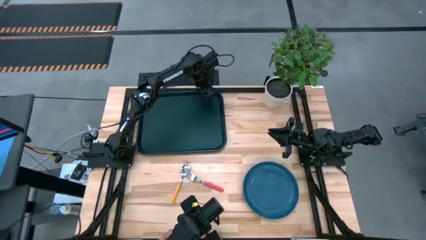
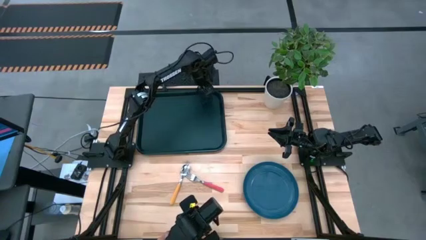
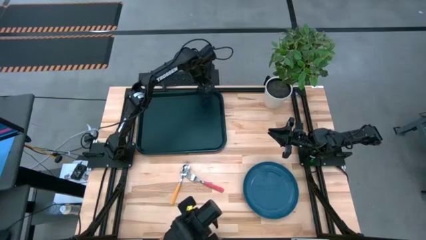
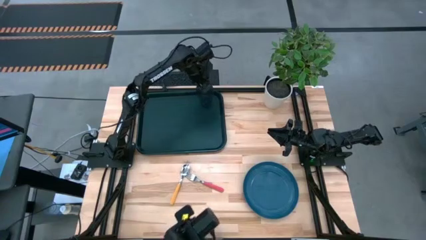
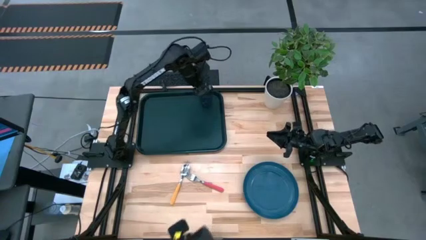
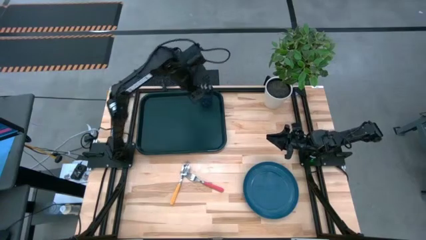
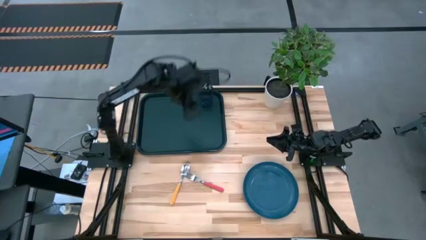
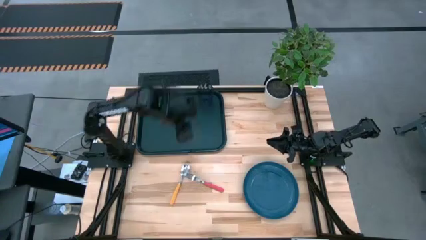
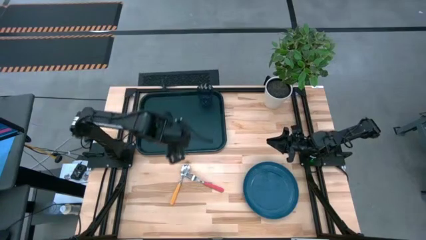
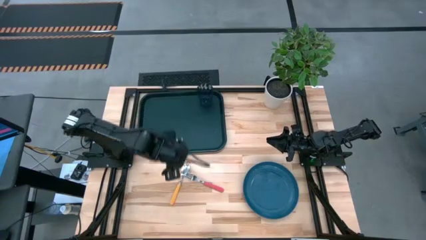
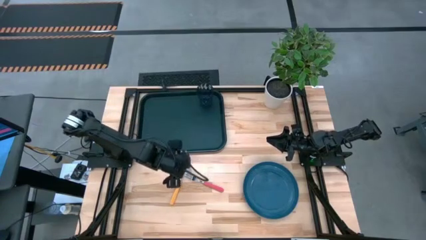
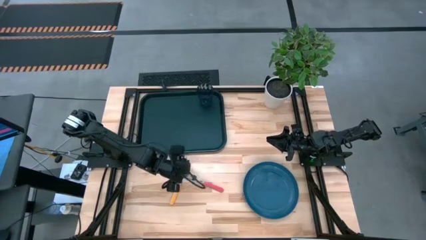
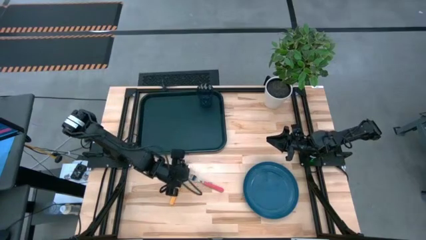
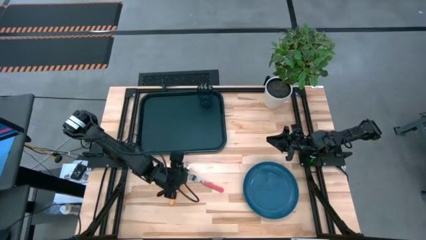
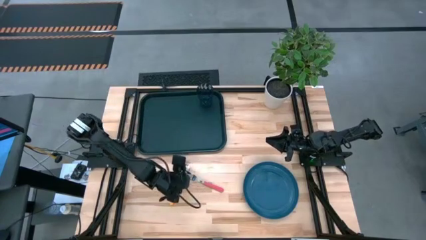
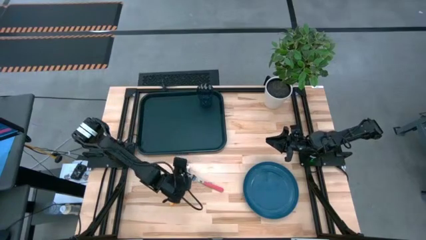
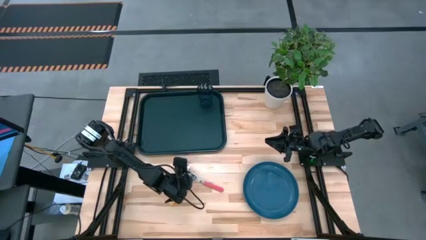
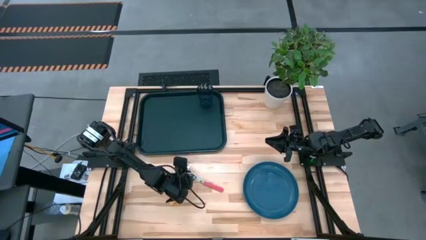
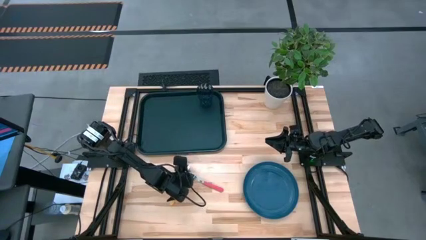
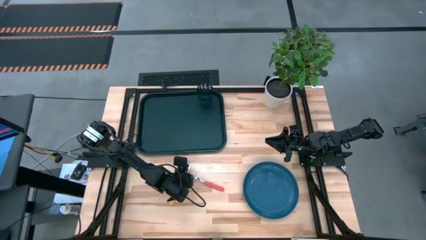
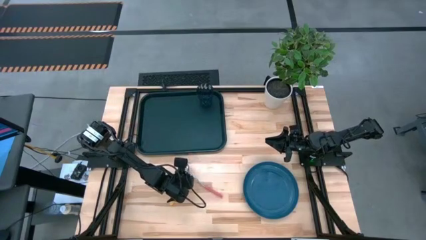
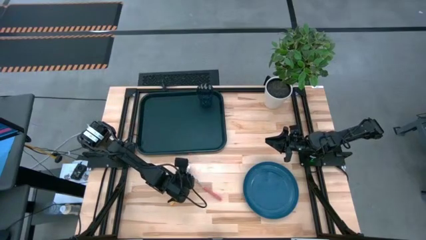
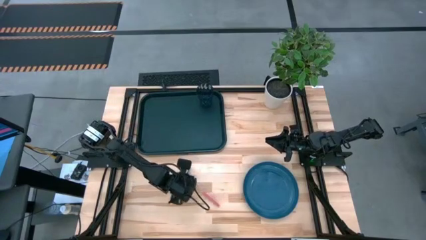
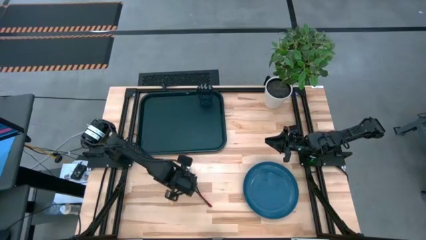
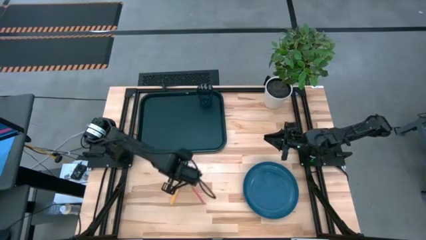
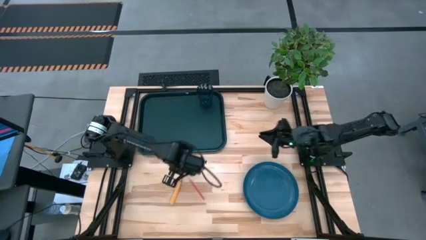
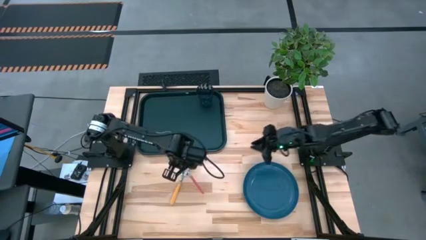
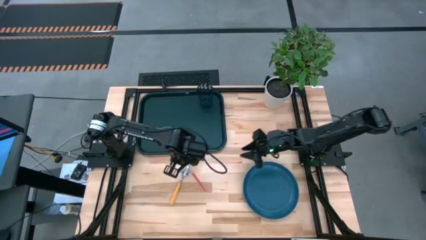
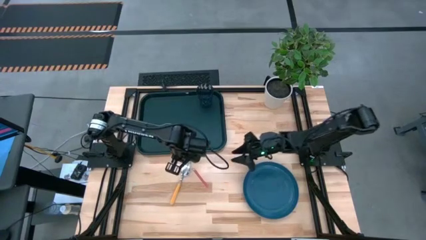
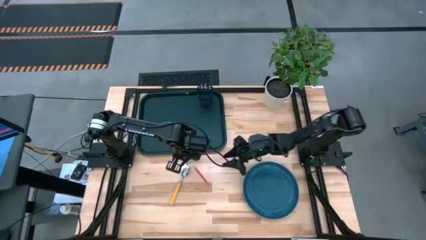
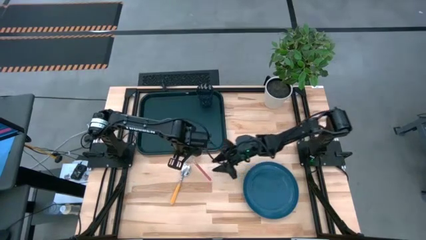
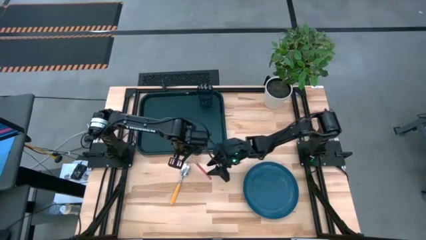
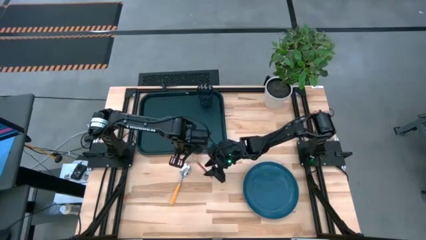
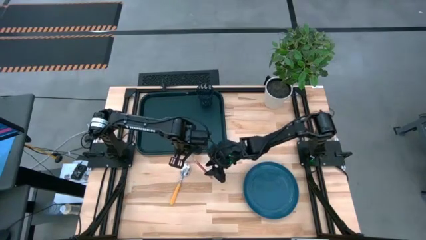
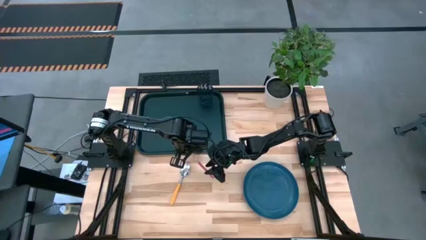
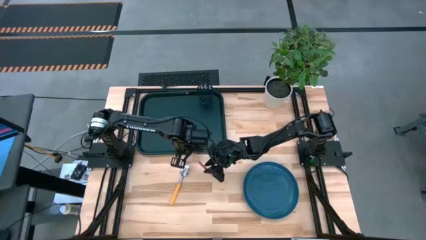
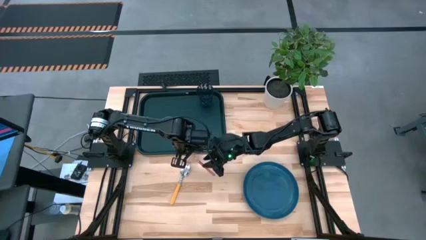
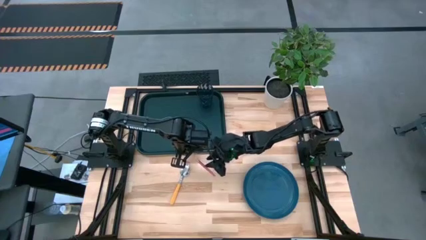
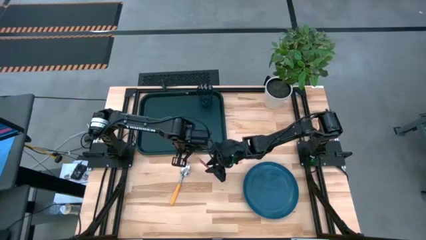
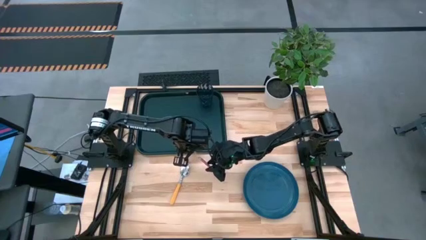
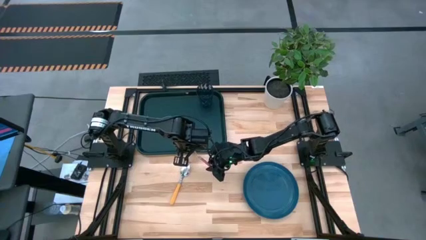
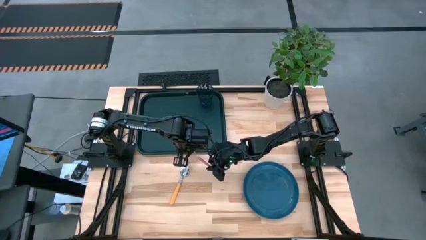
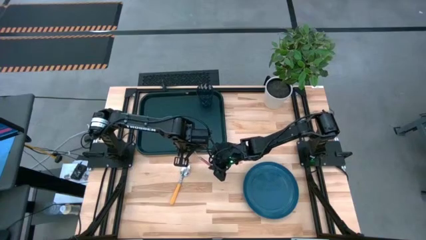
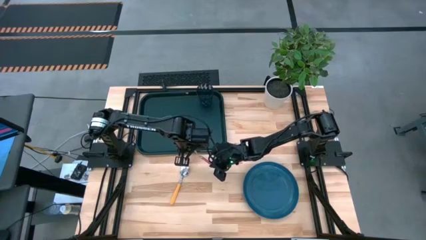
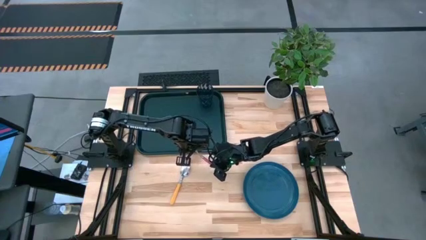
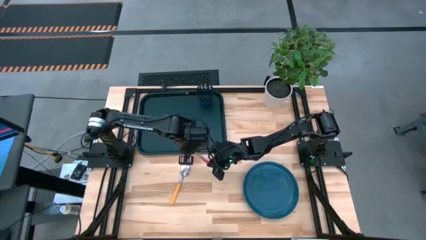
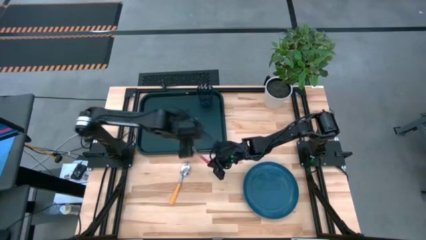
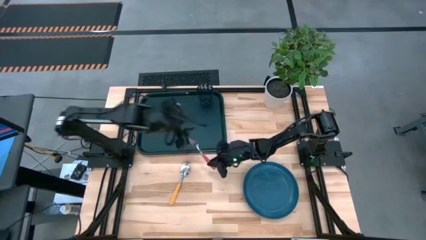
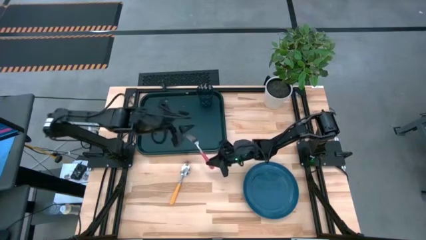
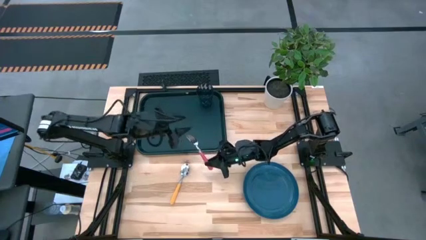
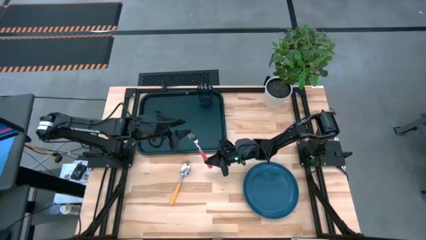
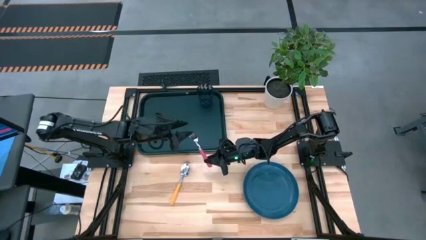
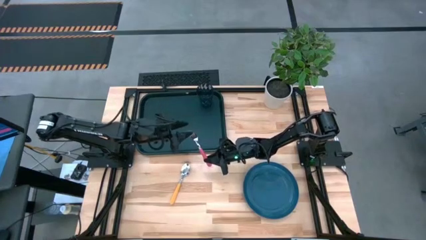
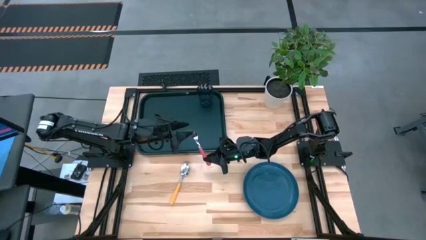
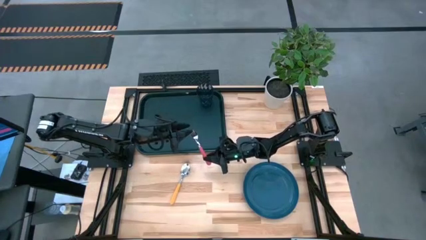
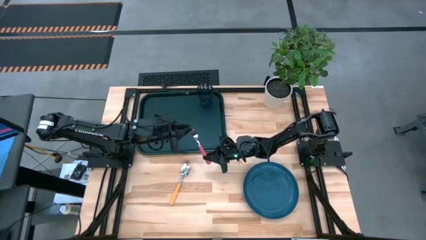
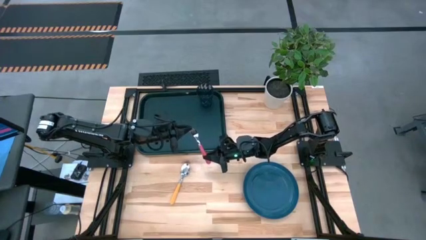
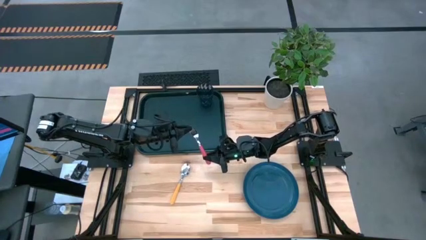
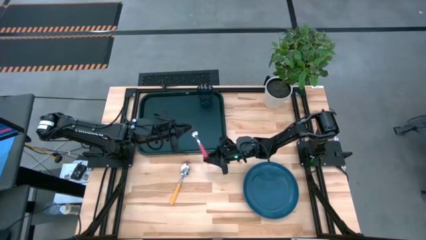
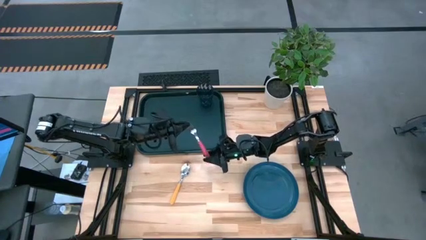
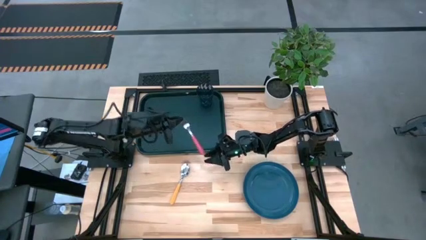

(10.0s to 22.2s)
Task: Pick and place plate/cup/fork/spoon on tray
Put the pink fork on the black tray to the bottom left of the blue glass

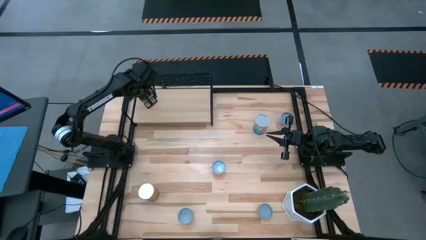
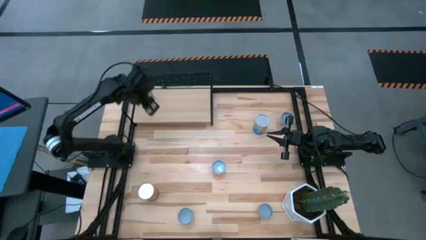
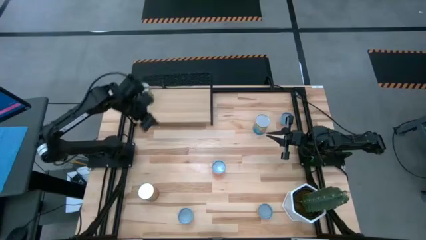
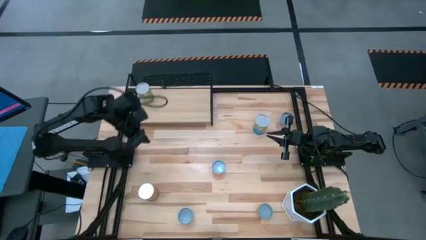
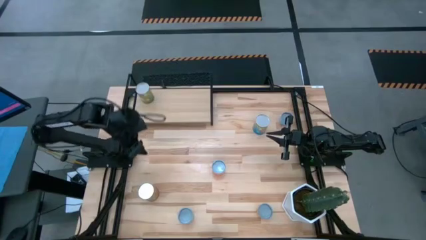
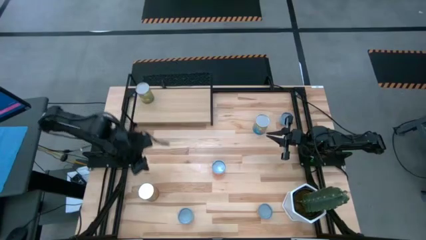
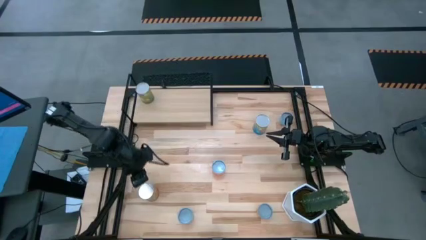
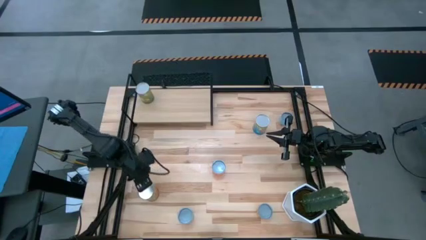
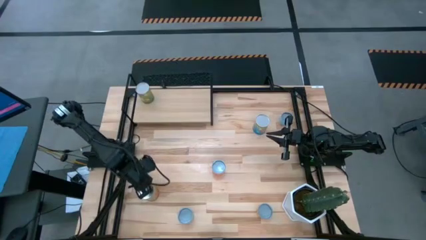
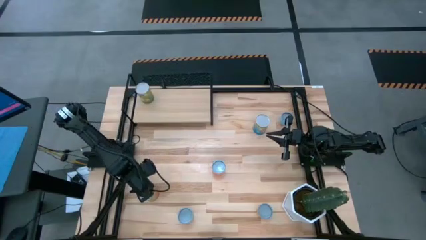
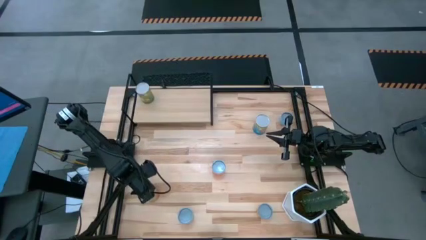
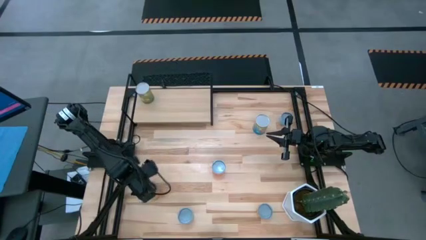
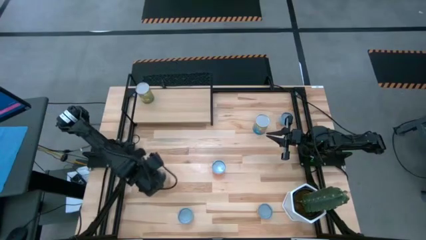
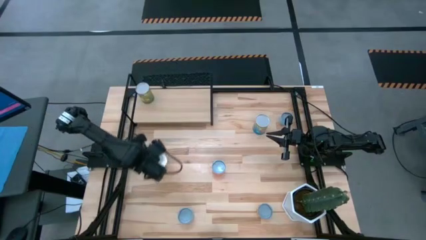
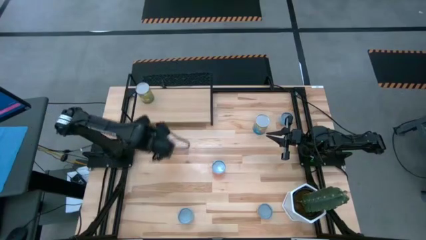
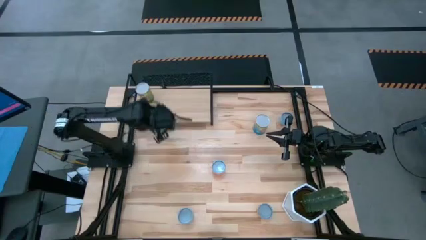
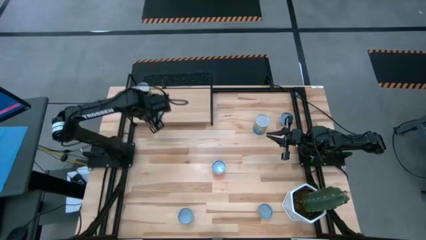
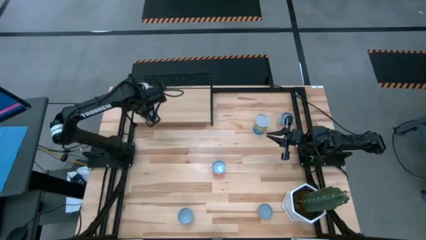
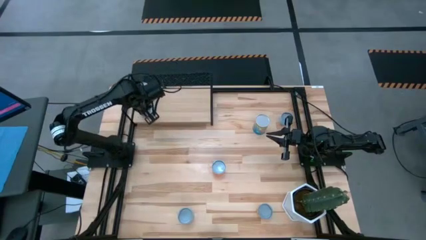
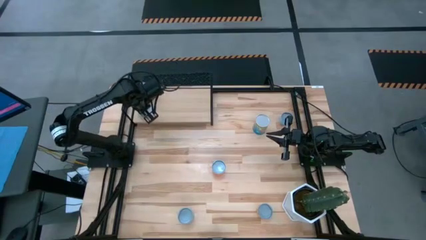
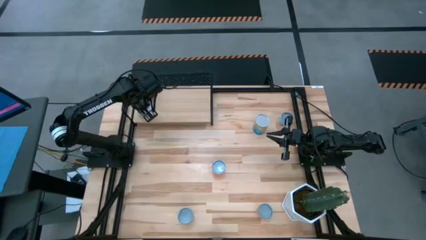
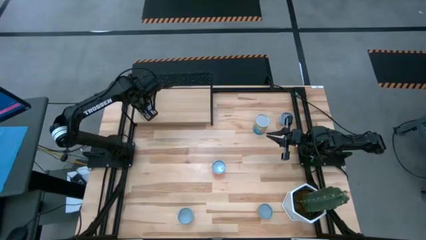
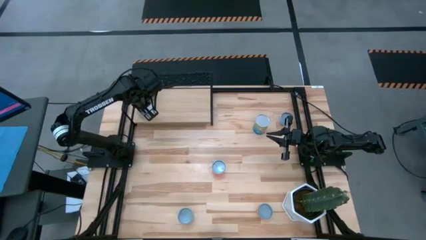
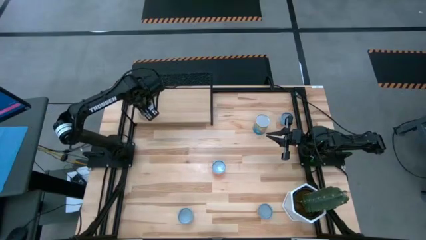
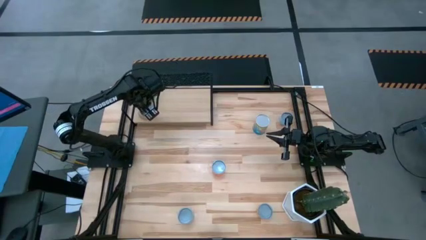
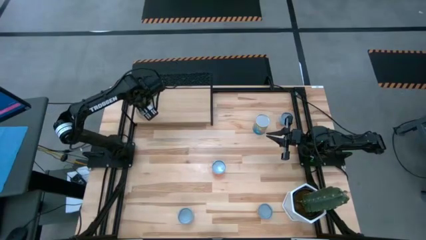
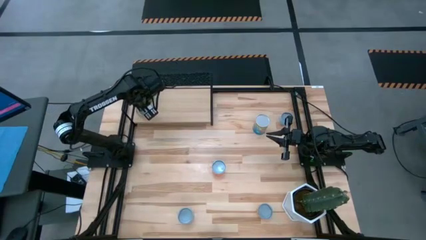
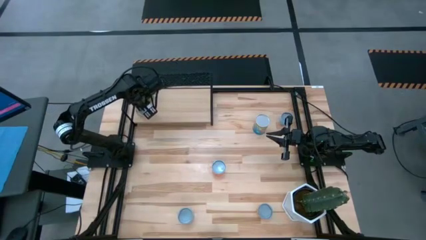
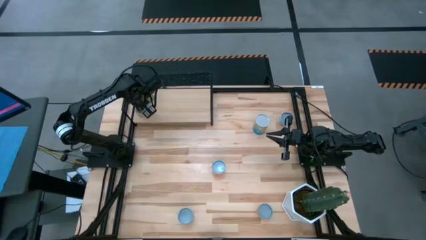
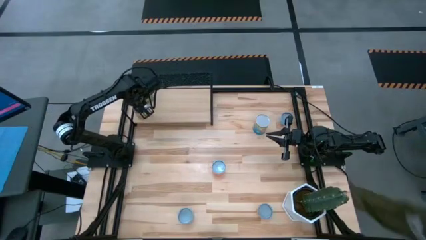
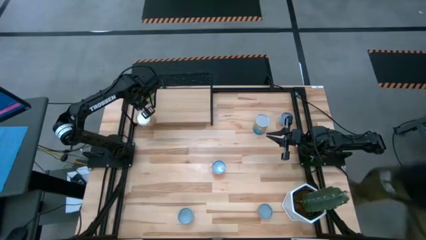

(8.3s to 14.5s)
Task: Pick and place cans onto a shelf
Put the canned green beans on the shelf
